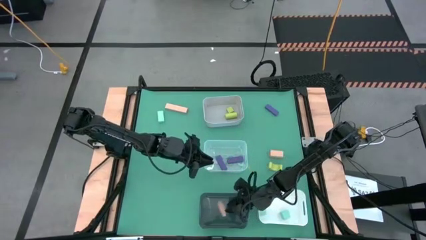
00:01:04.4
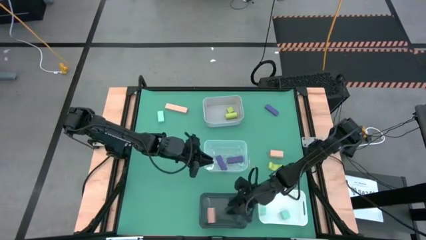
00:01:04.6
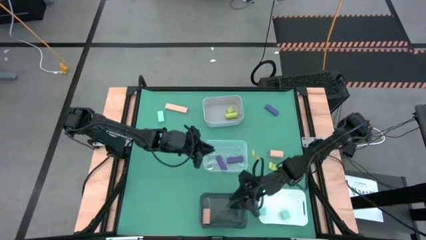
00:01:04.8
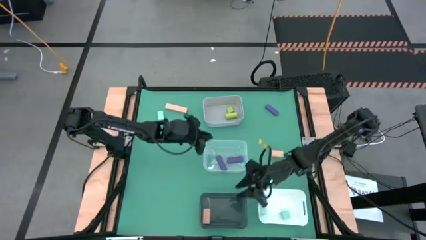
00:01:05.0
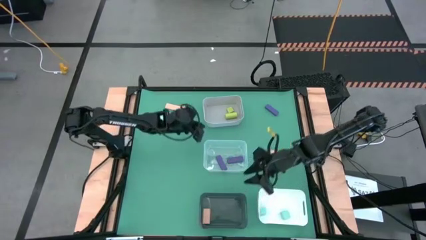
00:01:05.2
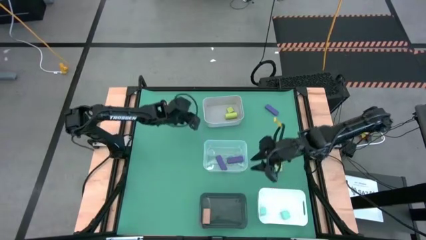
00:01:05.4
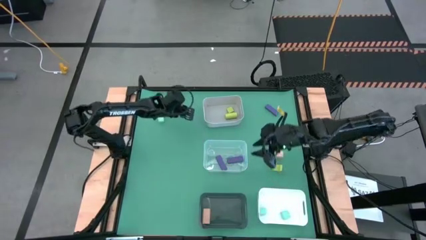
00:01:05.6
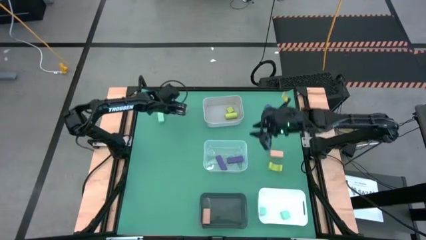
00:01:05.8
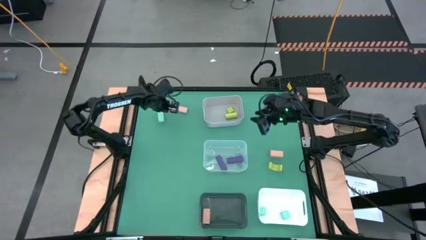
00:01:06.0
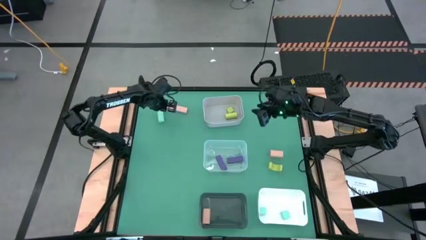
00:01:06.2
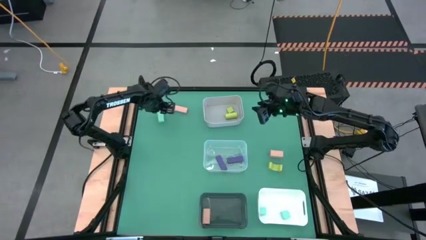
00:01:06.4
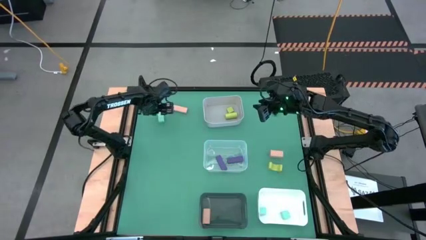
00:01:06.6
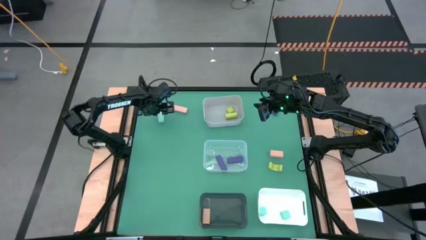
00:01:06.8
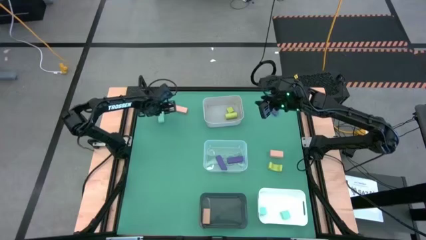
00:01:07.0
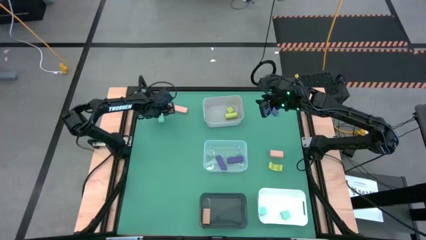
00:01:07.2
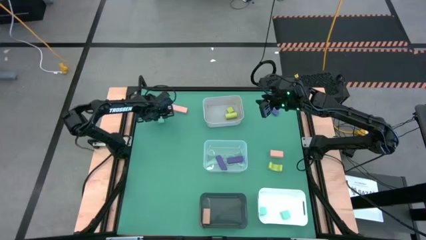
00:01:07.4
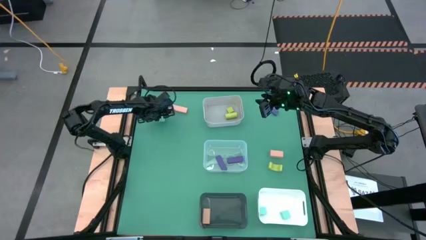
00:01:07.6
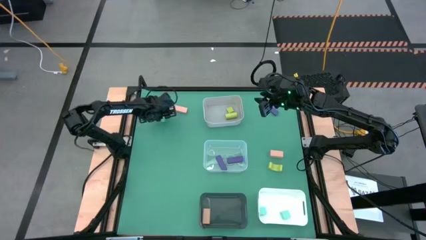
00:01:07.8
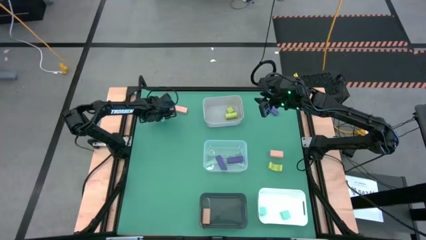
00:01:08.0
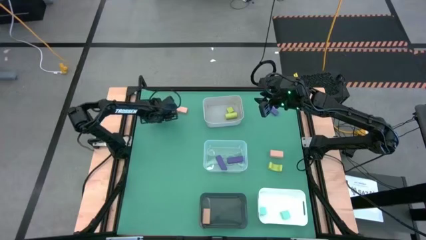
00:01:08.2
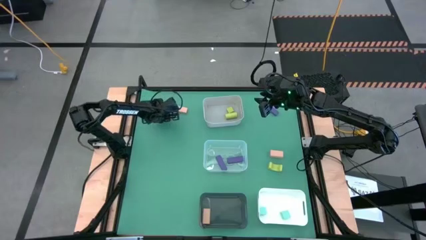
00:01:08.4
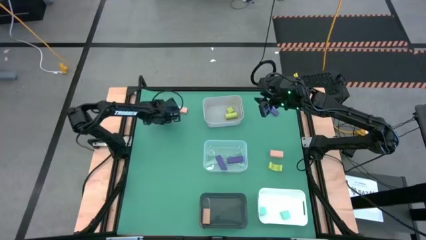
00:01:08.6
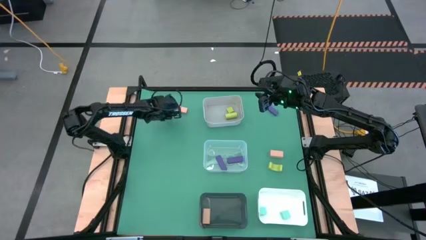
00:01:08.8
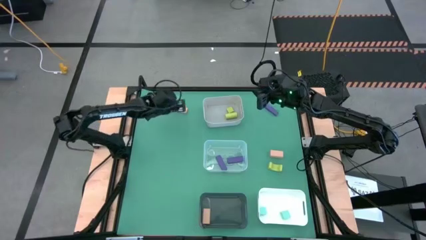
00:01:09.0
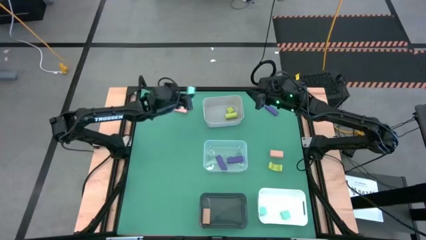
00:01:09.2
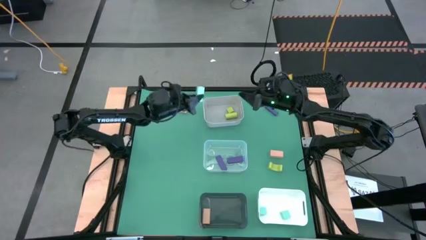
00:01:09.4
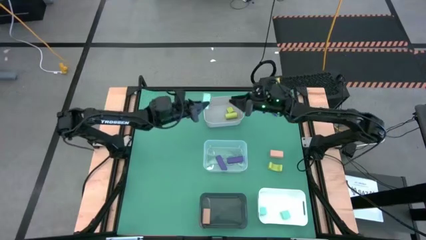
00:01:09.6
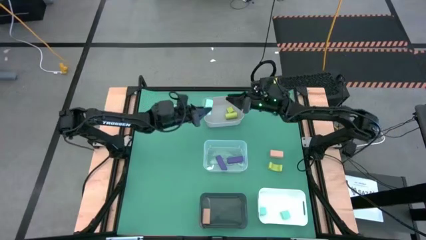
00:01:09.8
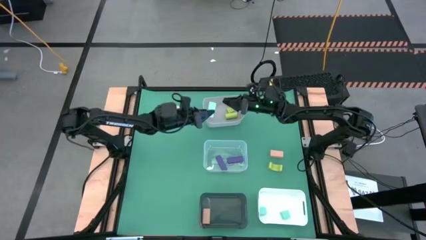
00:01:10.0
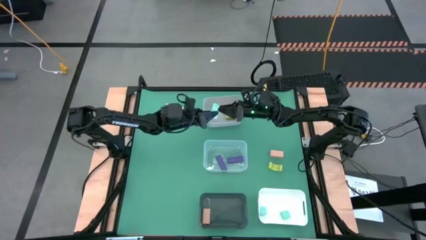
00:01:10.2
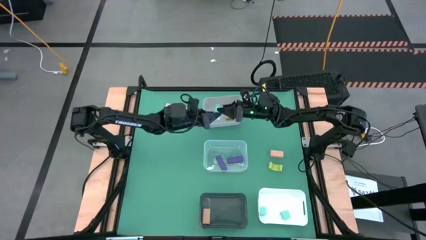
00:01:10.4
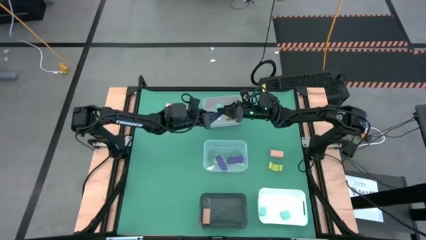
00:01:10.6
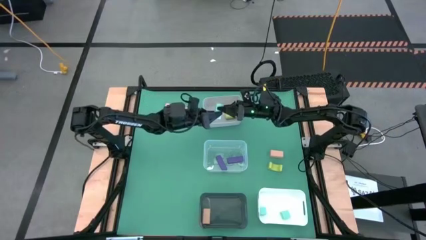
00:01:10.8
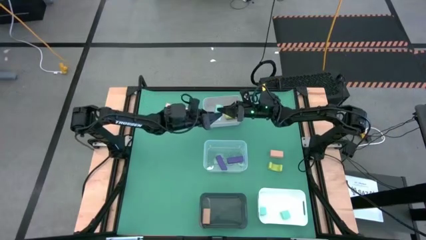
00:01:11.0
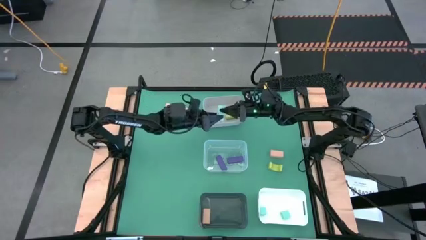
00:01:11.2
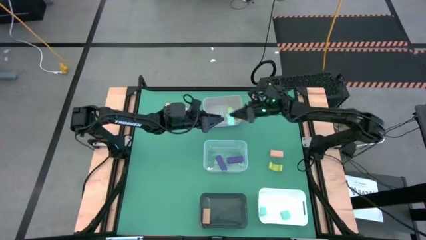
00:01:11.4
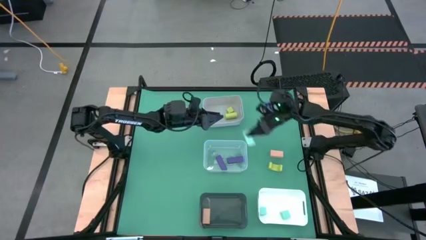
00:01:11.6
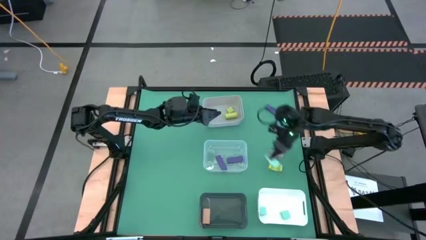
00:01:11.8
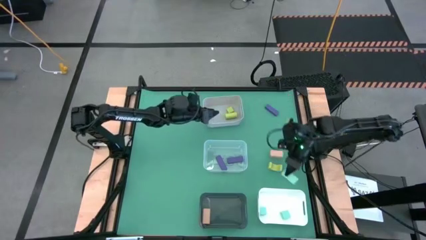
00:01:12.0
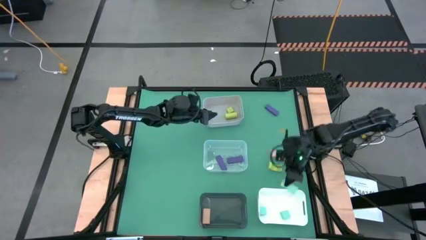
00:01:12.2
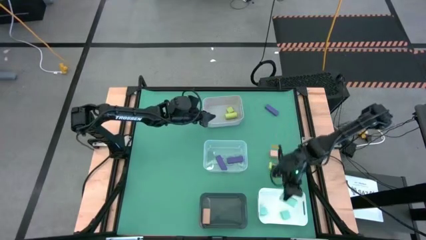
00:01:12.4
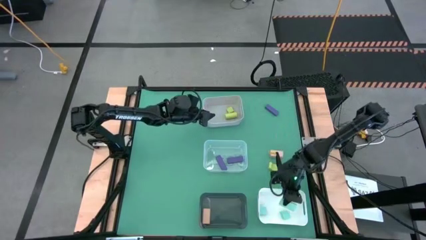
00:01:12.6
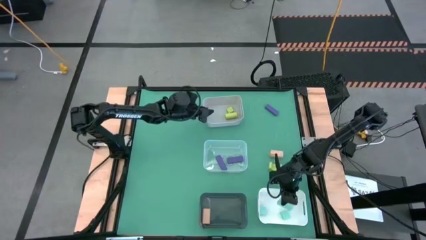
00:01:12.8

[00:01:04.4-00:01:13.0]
Task: Sort & place blocks by color
Put the blue block into the white bin

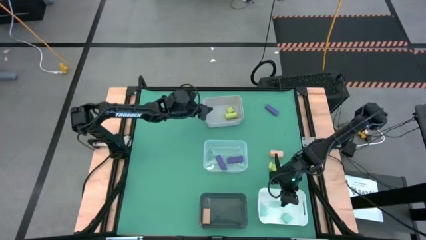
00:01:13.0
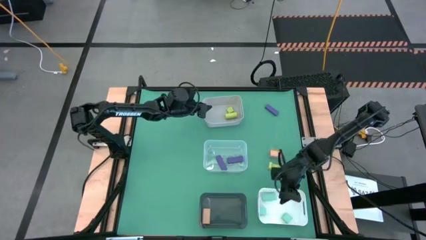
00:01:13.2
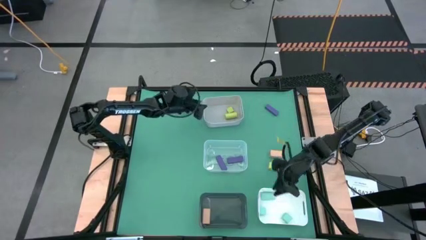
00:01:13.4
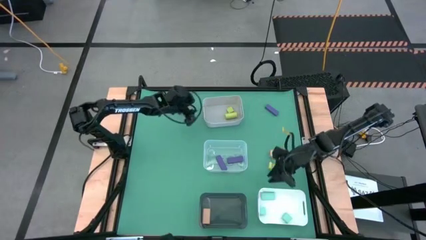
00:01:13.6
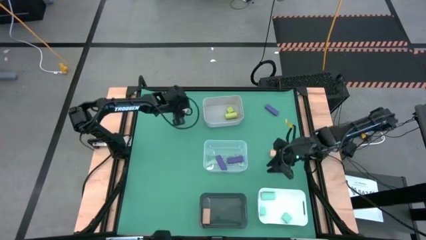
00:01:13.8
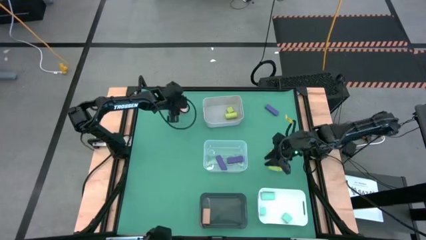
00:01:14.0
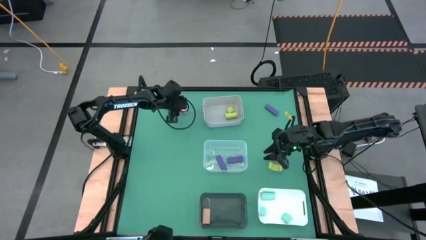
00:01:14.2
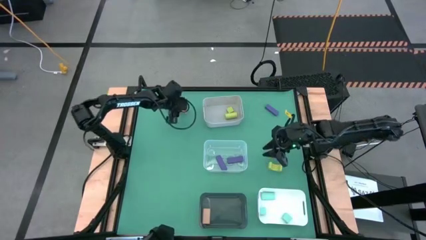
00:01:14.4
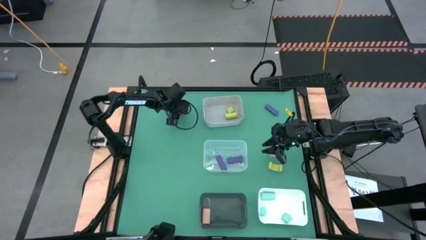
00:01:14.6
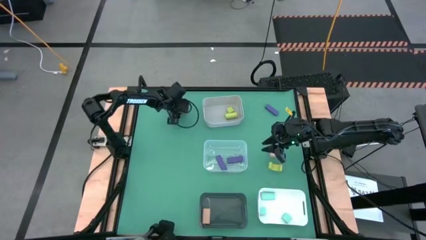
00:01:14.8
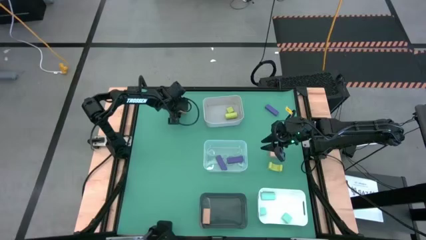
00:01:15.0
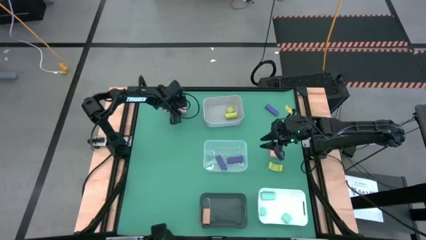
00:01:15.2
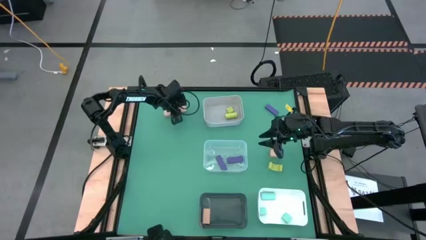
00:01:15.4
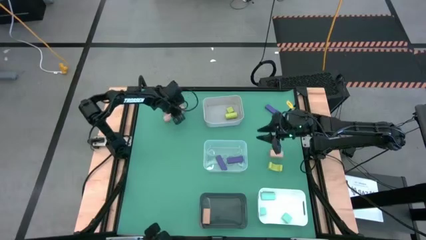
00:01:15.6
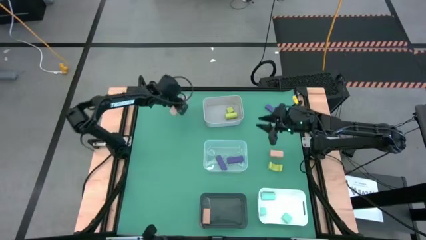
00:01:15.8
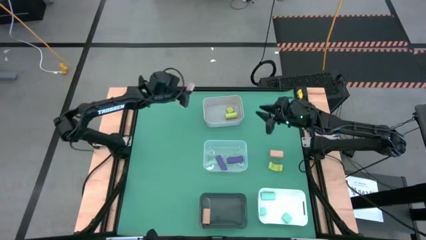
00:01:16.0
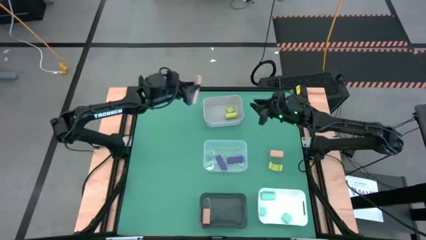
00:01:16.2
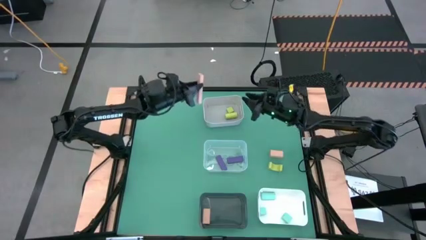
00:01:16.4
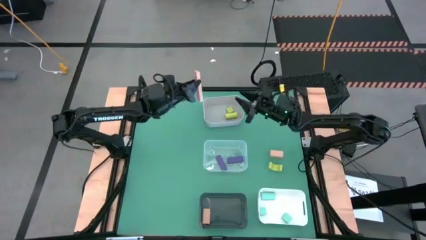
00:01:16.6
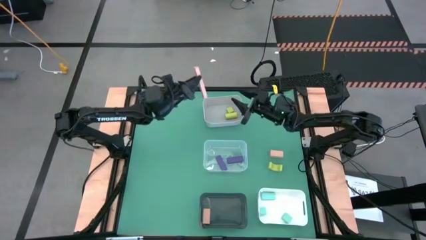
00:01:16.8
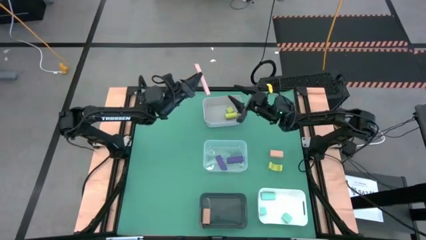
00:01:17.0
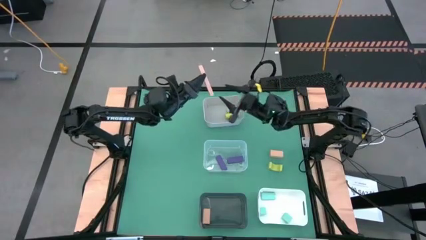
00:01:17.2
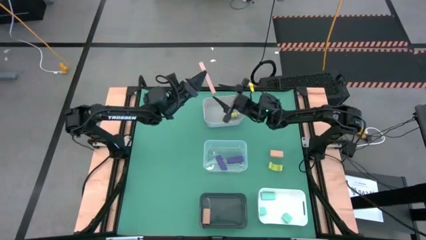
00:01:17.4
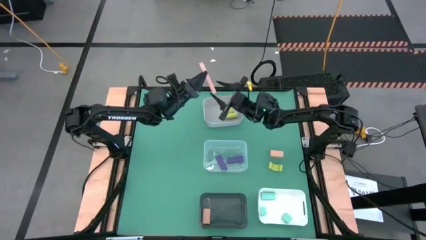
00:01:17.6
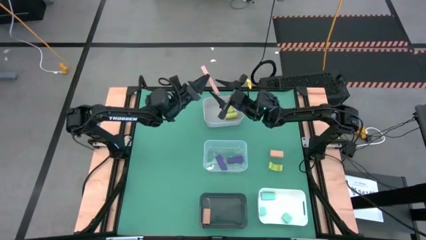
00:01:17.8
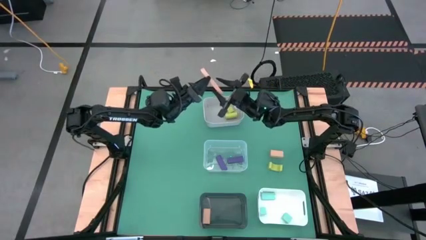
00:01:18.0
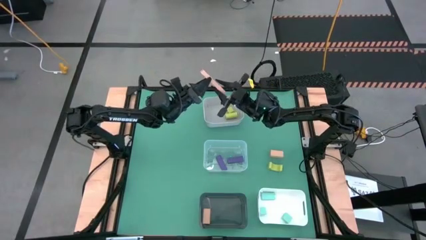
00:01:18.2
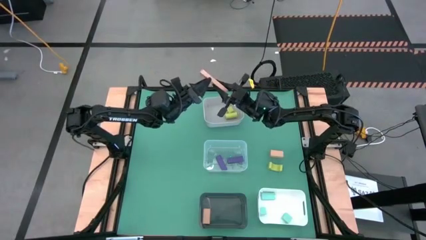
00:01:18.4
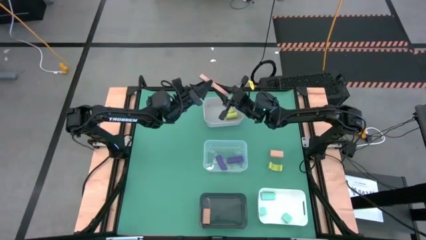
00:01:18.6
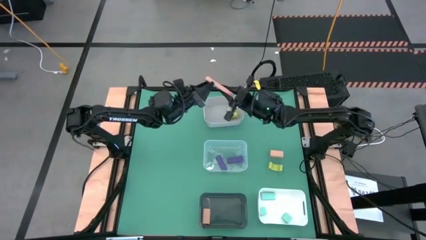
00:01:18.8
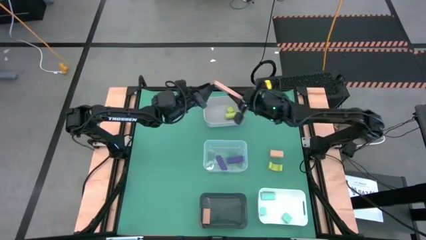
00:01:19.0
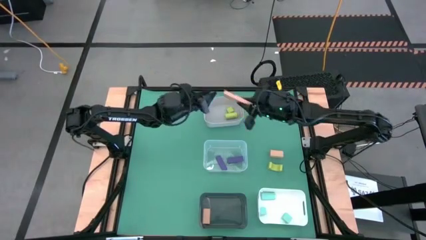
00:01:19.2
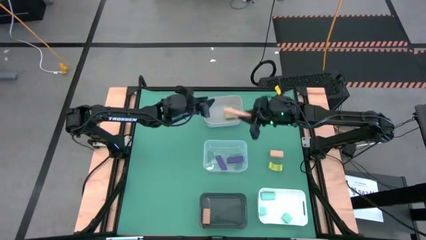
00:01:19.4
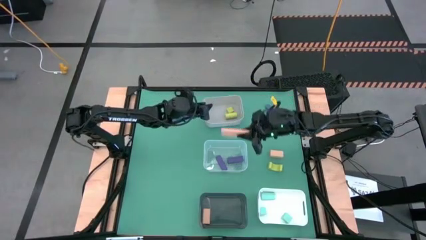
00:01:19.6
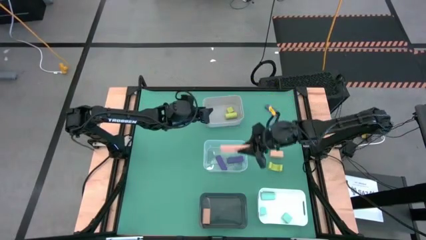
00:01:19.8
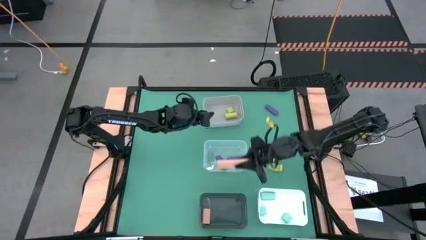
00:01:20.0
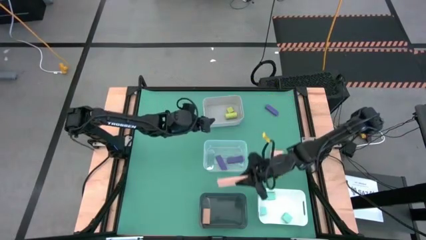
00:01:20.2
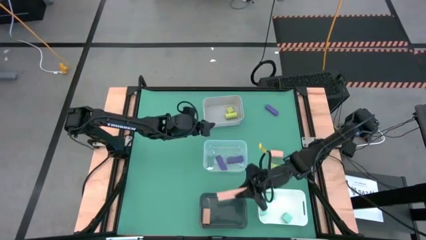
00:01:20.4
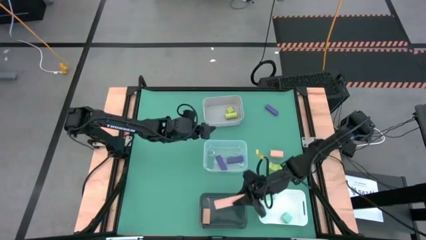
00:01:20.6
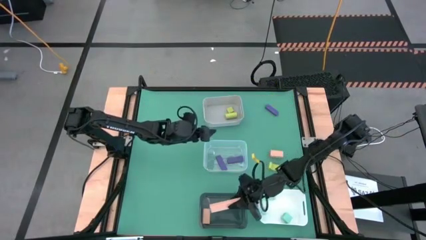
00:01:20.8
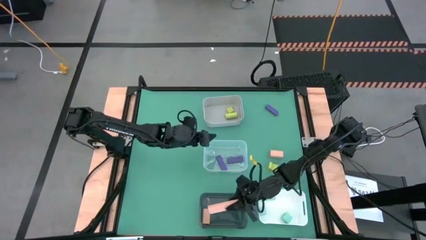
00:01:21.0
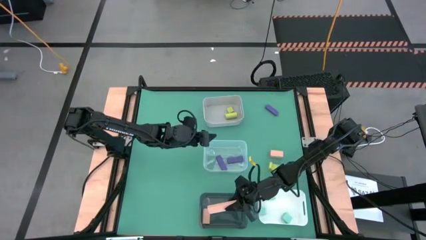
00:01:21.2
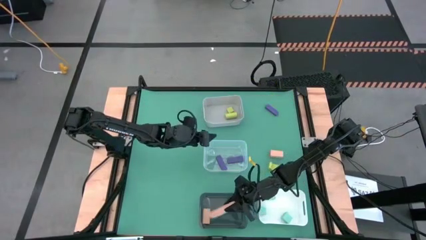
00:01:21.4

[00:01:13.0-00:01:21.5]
Put the top pink block into the black bin
